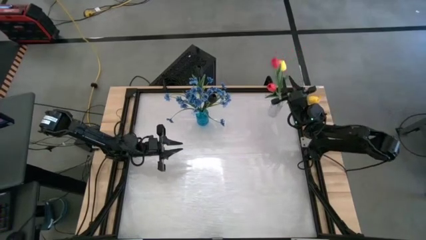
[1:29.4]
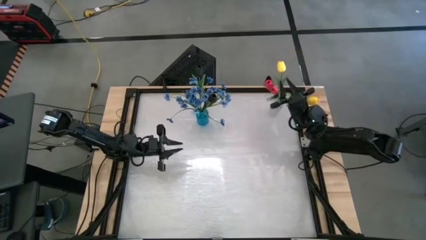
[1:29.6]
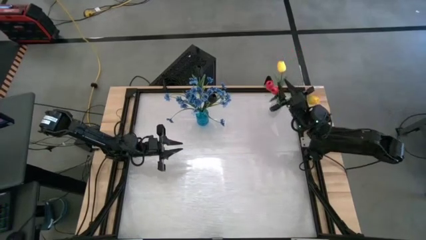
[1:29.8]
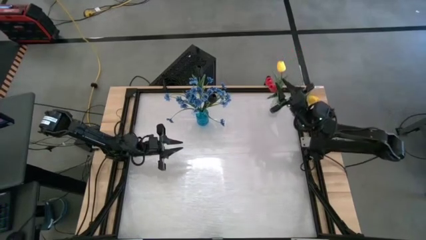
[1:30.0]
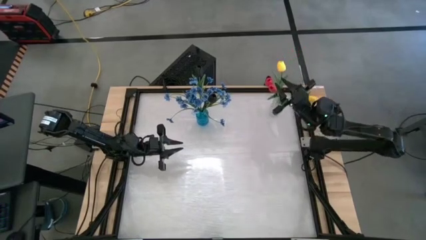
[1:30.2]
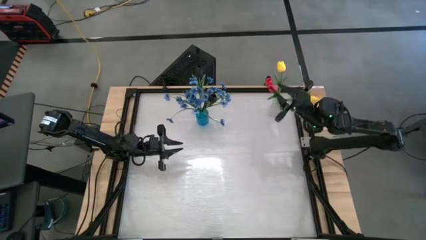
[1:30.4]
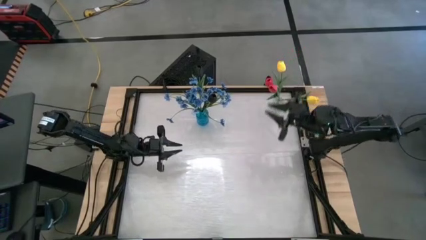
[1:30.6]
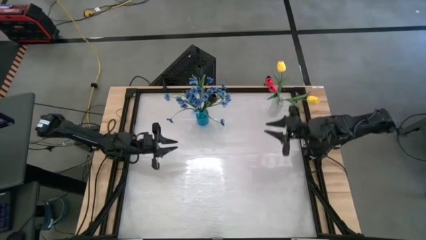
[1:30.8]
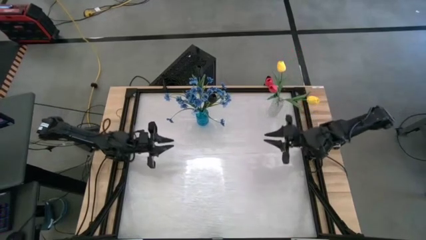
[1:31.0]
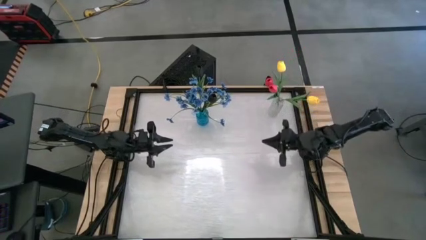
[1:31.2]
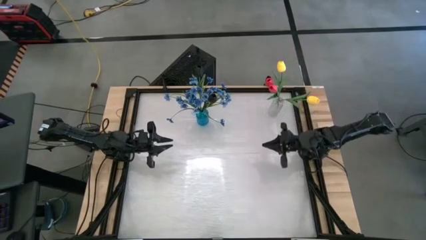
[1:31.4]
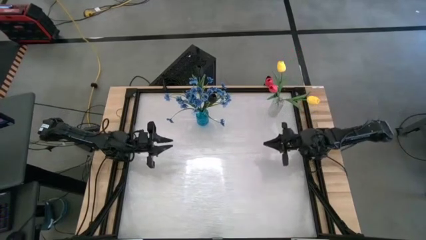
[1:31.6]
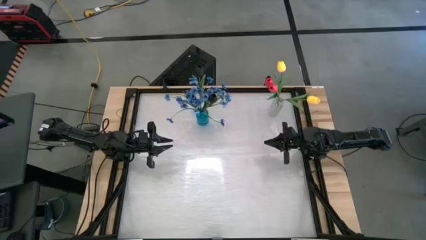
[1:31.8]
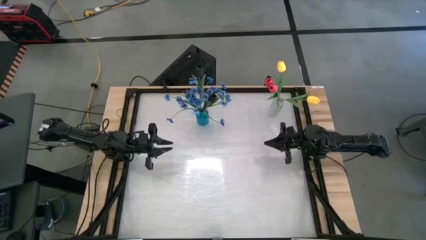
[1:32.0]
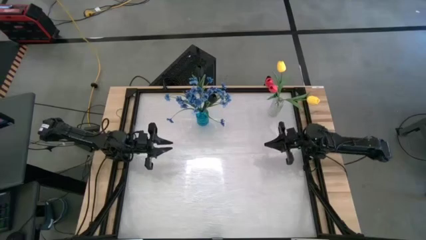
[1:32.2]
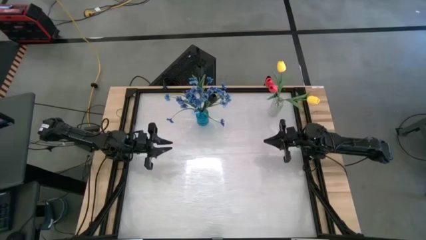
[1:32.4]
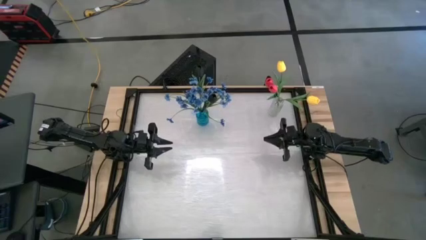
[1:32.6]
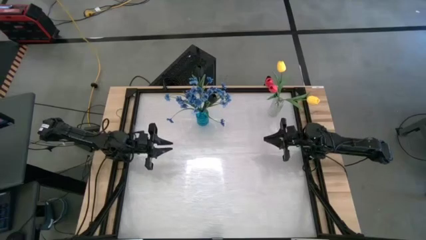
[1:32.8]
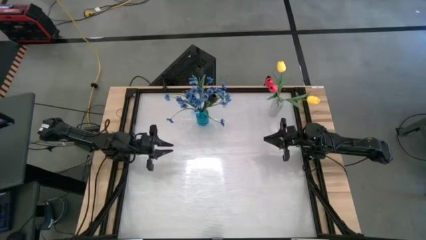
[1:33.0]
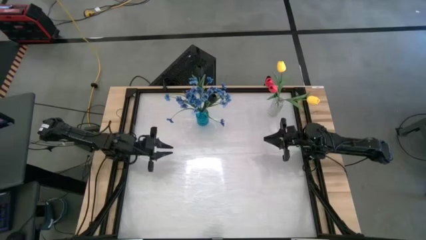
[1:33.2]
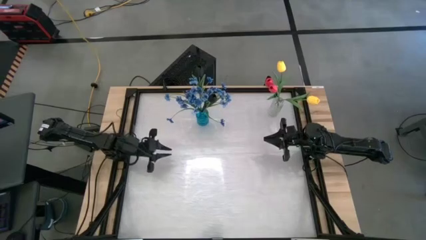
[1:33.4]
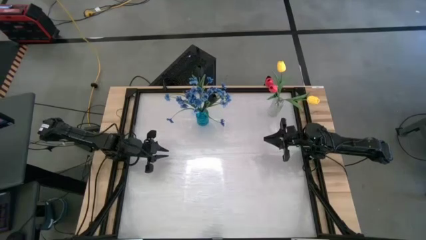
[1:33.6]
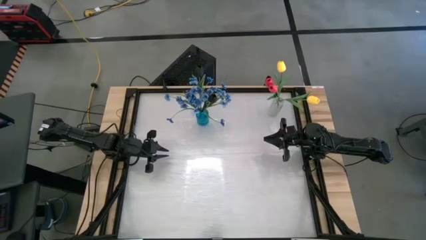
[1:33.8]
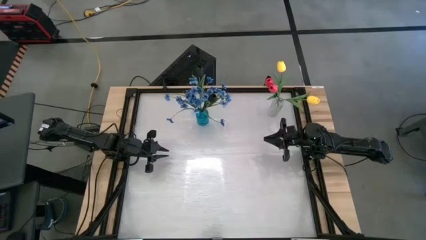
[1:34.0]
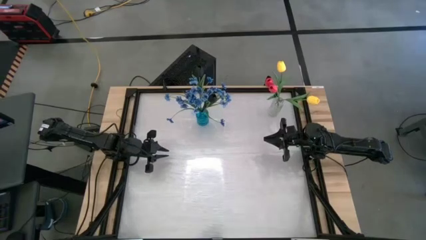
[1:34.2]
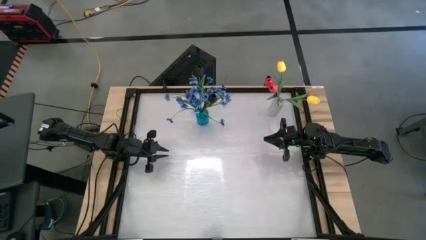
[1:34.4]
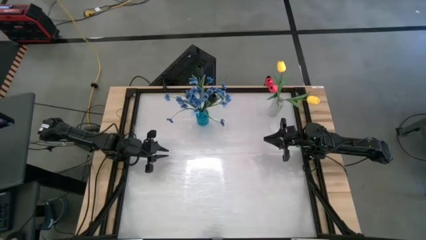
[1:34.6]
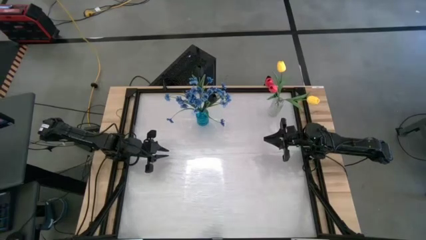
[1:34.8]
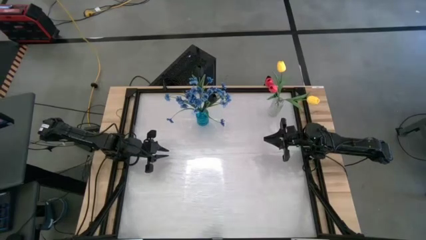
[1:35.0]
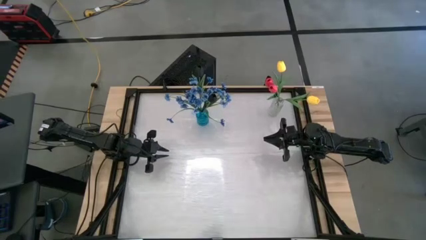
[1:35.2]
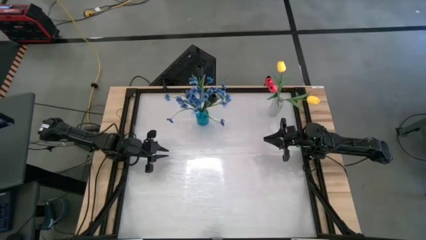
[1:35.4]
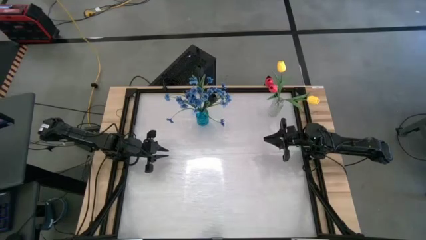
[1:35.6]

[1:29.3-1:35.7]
Task: Sort flowers into vase by color
Return to Home Position

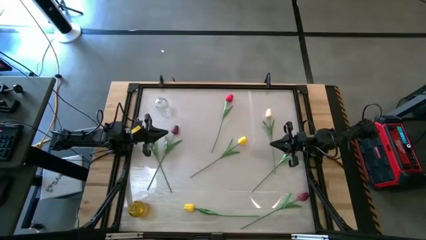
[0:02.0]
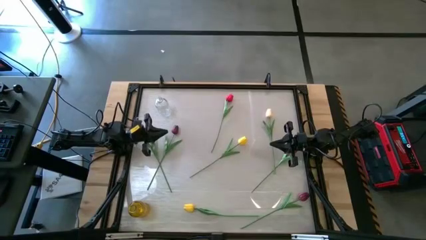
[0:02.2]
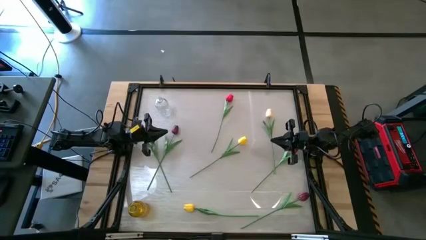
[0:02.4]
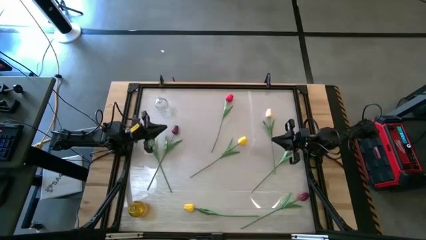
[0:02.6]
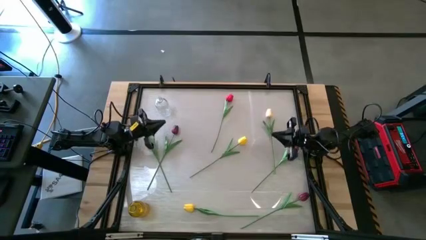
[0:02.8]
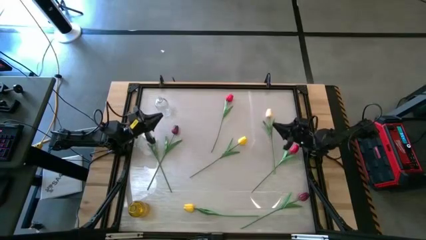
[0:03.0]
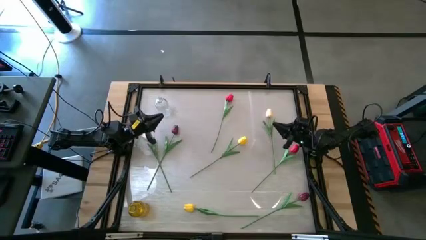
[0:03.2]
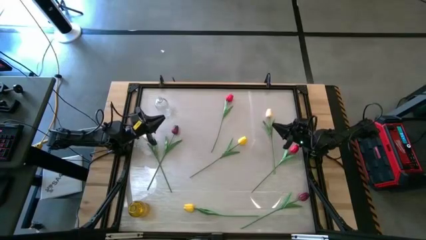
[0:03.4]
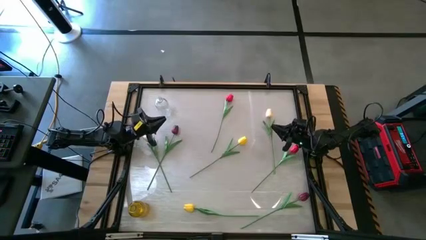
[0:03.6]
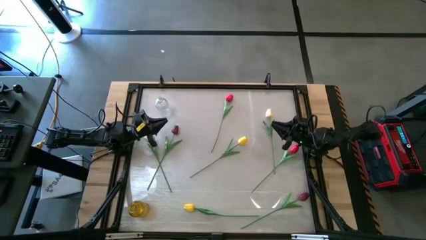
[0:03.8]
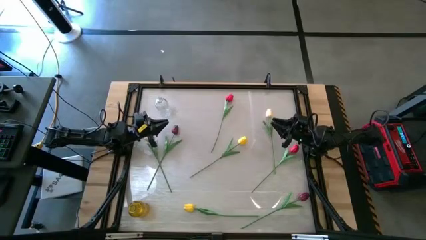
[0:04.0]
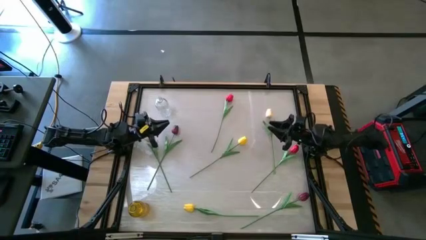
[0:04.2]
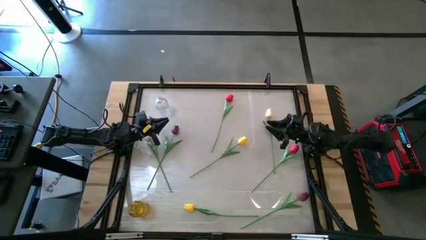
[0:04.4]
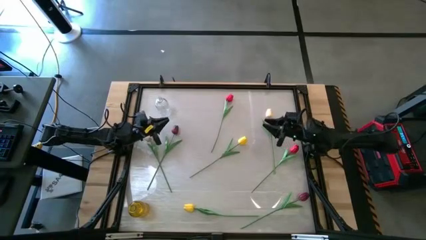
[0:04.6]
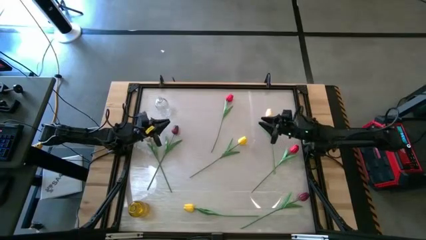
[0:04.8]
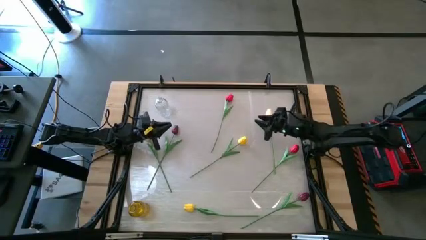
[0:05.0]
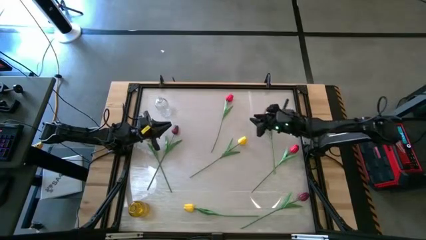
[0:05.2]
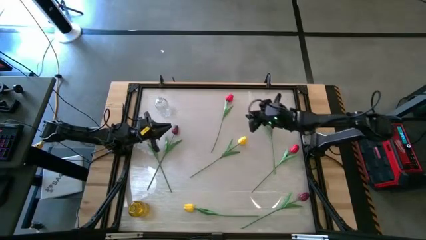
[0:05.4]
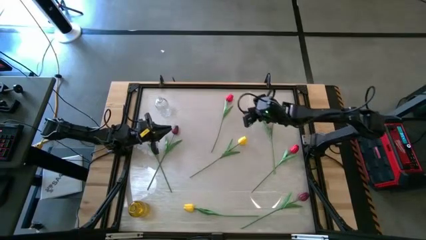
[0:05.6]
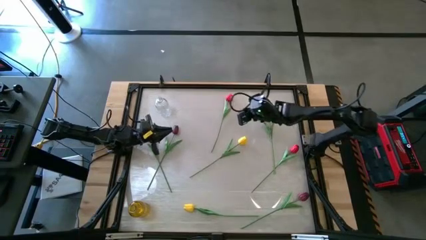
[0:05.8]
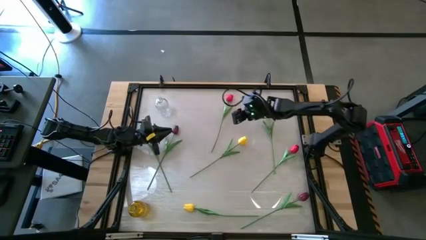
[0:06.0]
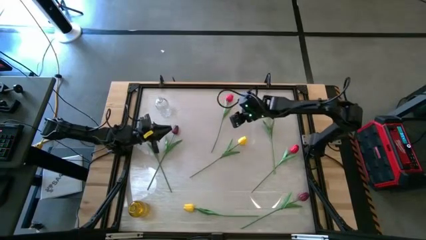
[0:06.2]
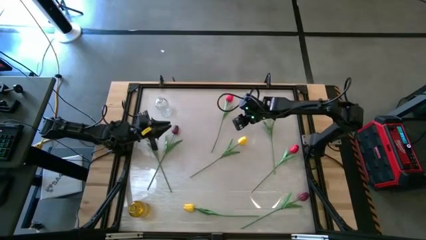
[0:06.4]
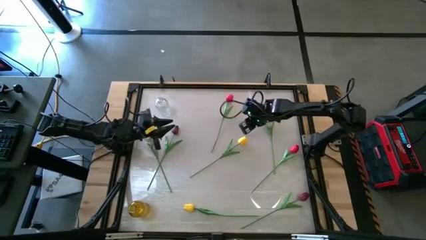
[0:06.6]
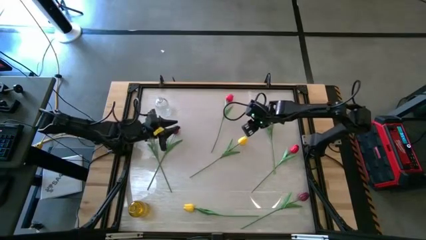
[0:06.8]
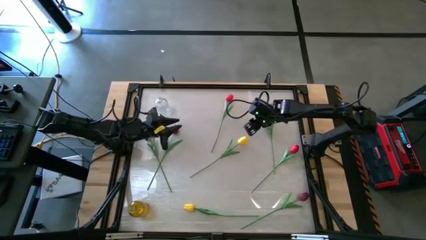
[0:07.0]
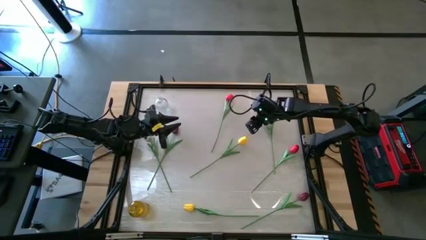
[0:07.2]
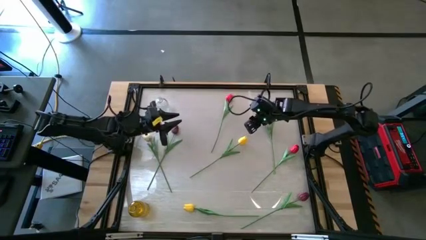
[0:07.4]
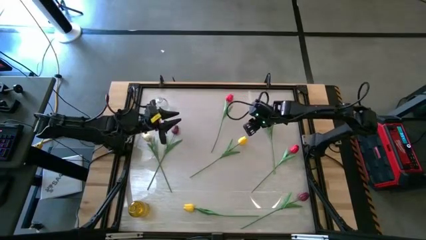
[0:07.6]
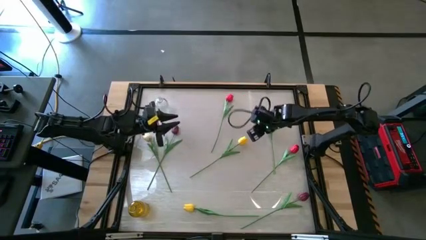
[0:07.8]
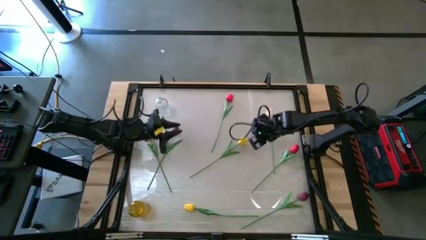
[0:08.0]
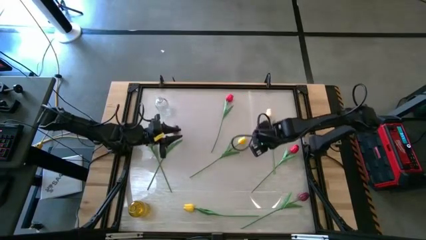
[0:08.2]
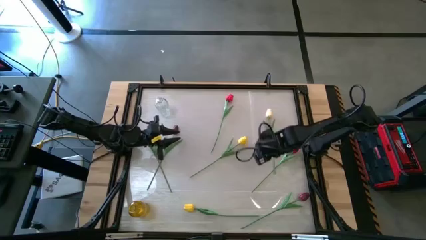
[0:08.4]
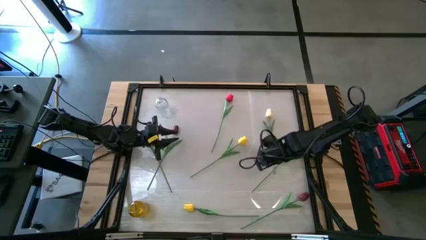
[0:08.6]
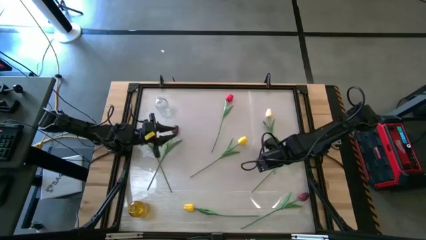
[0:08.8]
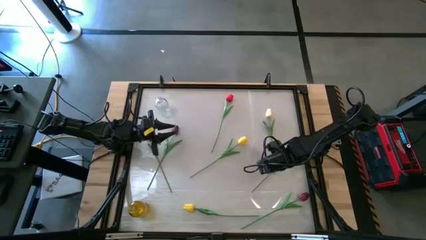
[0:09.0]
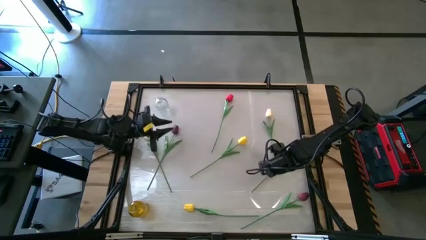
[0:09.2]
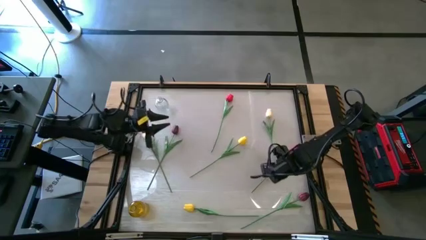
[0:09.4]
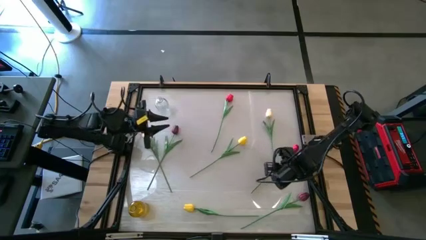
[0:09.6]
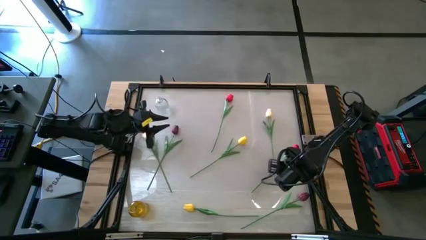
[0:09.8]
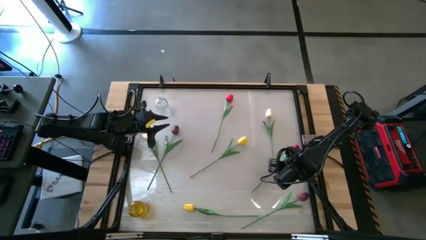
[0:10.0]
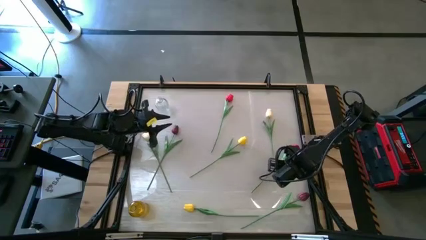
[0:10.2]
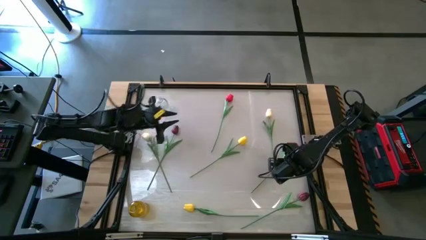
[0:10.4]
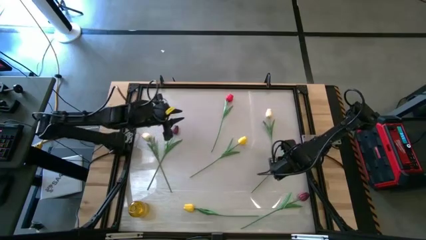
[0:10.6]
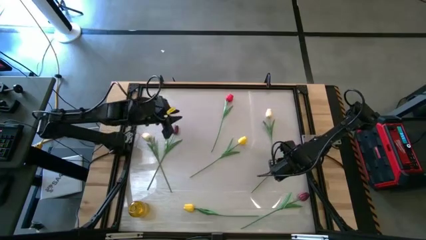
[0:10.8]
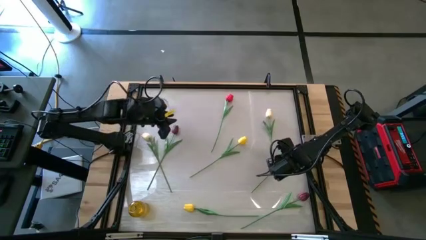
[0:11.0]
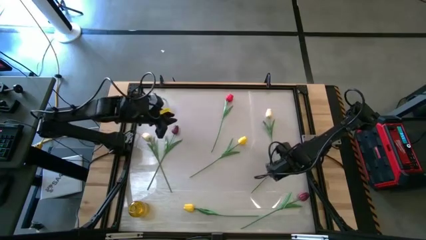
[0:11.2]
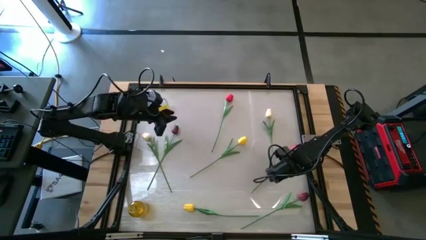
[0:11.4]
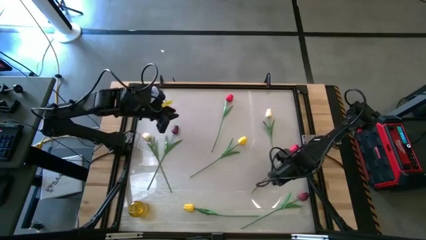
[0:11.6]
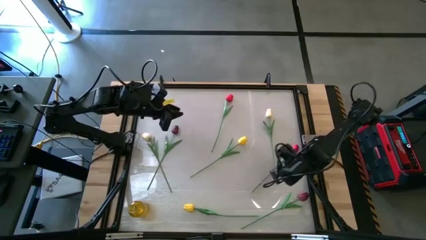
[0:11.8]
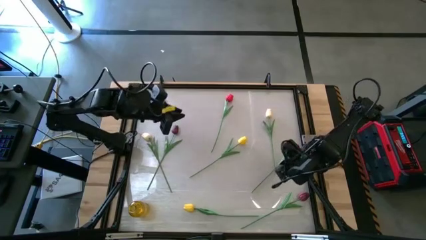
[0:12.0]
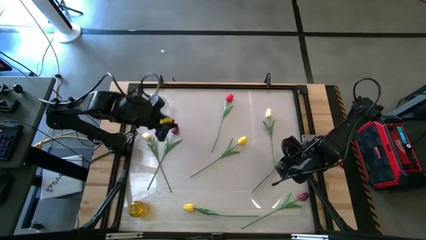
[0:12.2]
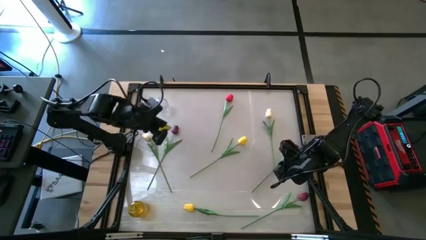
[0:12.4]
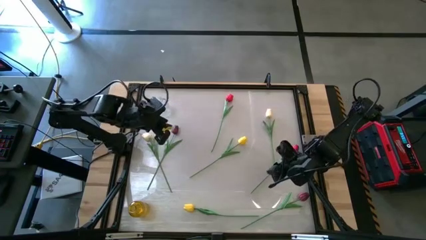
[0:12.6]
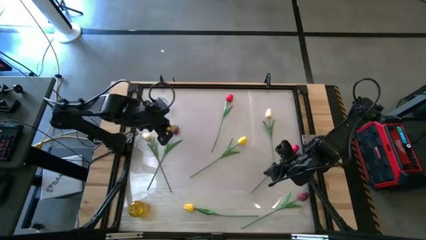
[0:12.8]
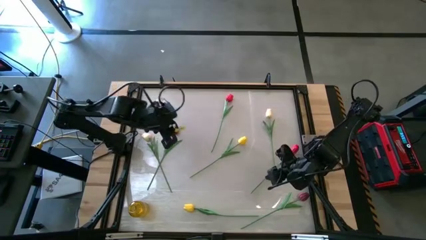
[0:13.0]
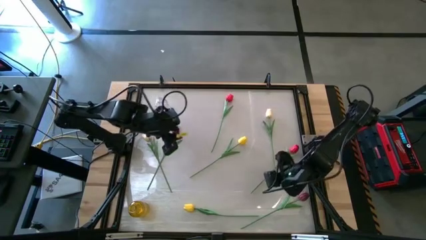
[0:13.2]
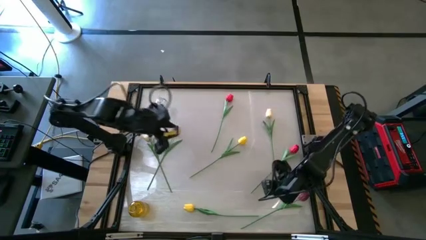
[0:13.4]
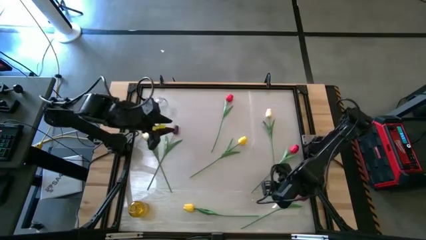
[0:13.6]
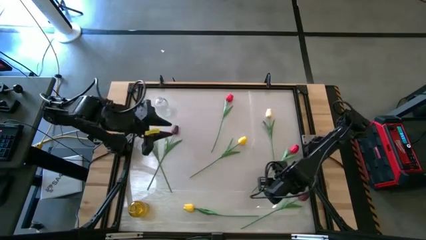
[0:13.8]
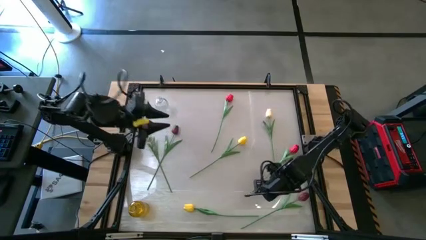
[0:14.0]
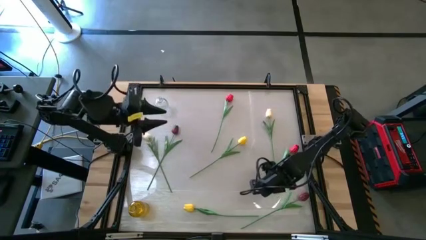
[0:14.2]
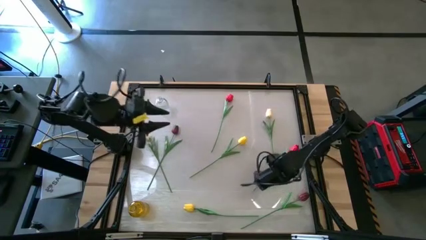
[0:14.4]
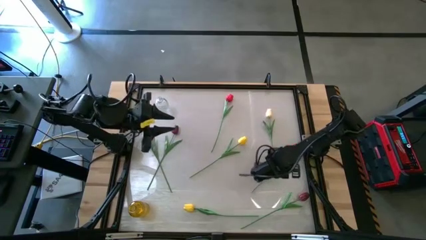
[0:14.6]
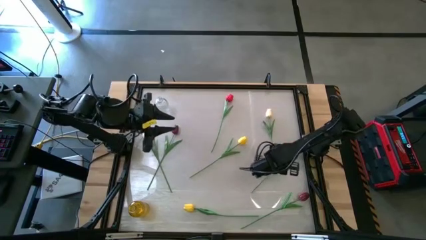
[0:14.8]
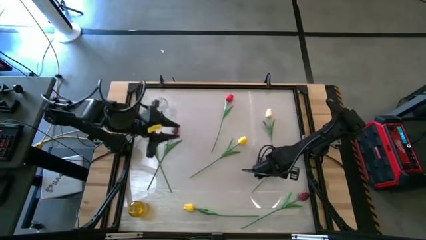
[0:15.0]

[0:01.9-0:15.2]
Task: Sort flowers into vase by color
Put the bottom red flower into the transparent vase
